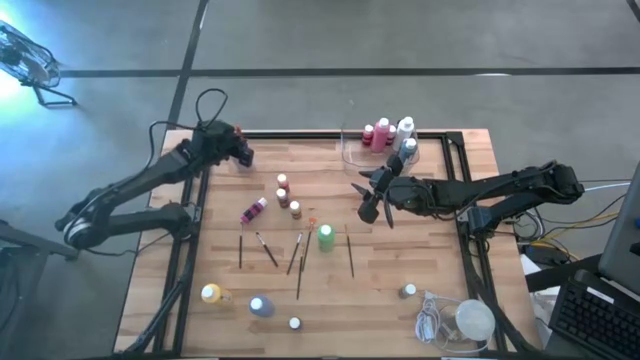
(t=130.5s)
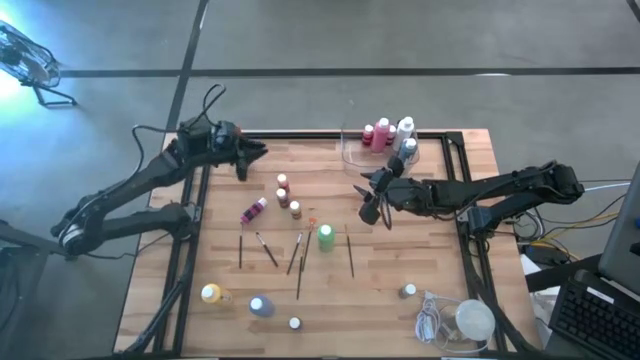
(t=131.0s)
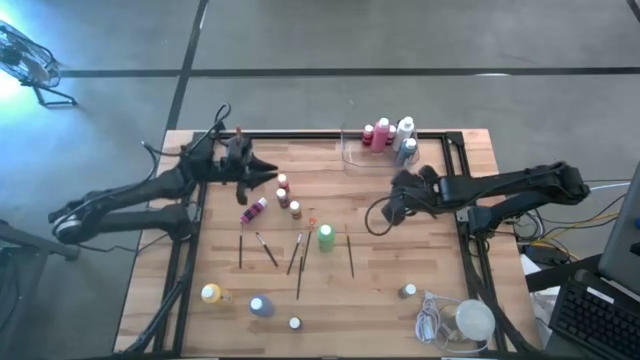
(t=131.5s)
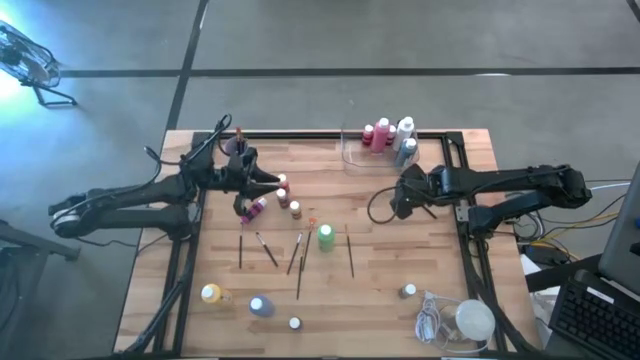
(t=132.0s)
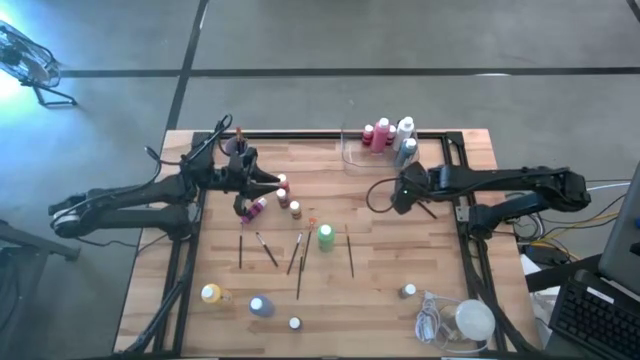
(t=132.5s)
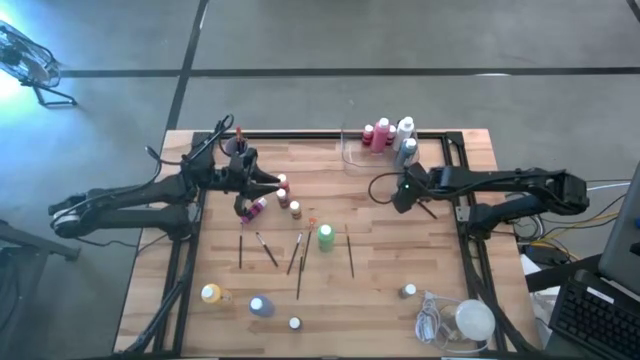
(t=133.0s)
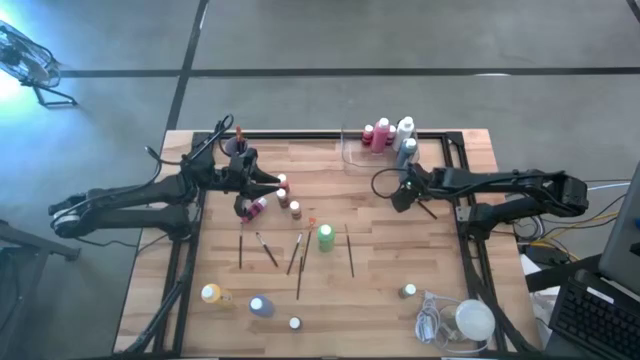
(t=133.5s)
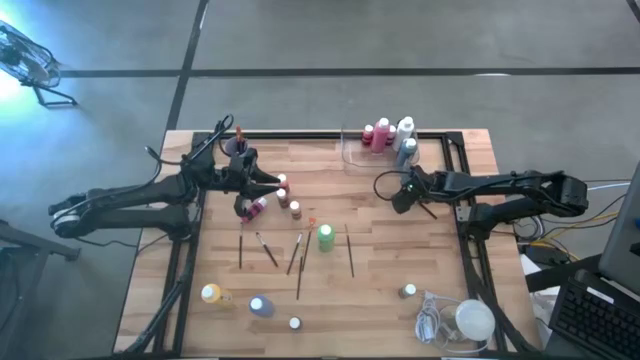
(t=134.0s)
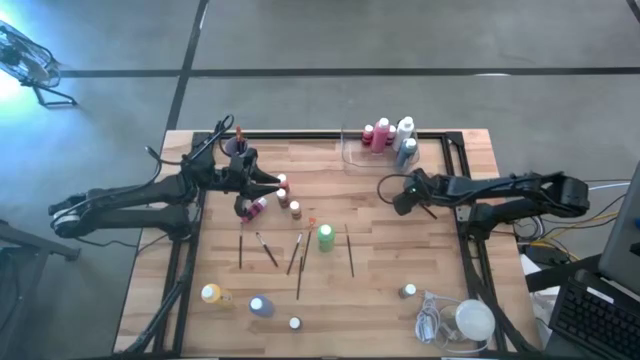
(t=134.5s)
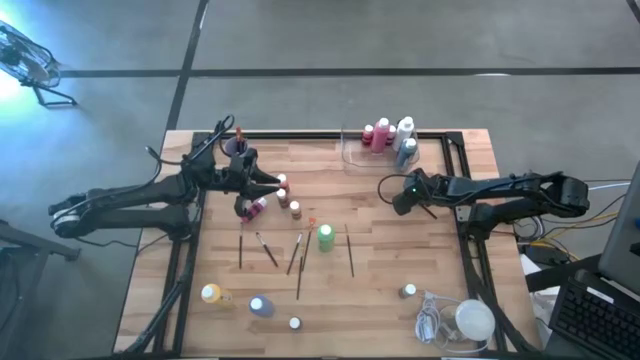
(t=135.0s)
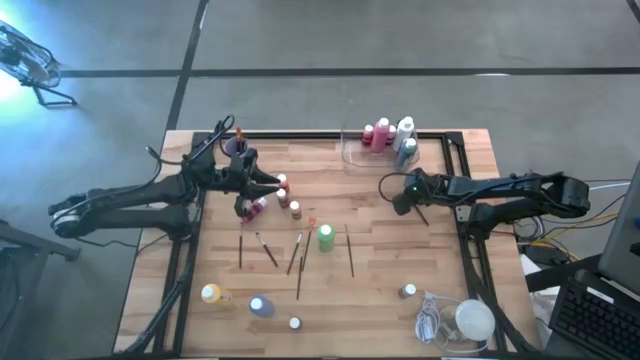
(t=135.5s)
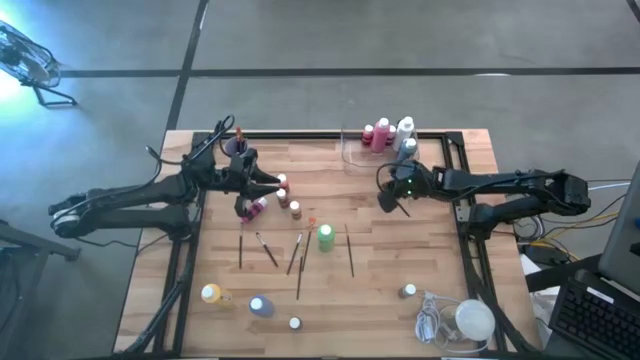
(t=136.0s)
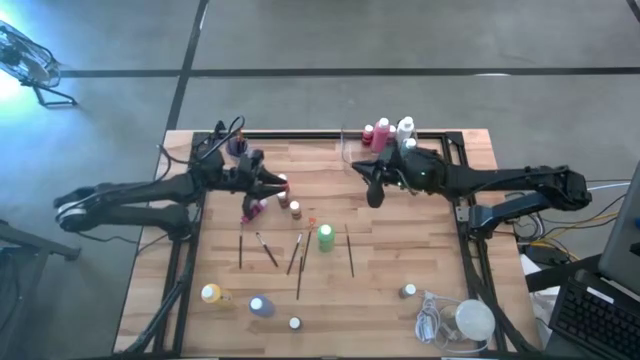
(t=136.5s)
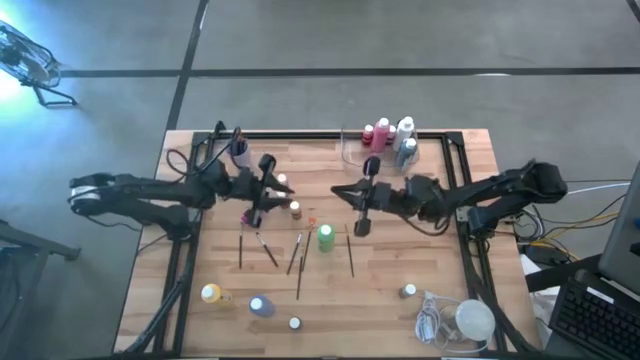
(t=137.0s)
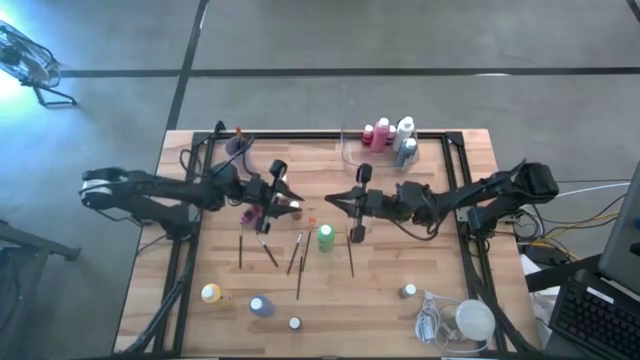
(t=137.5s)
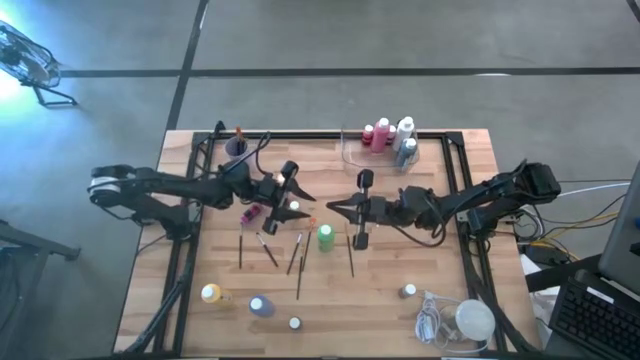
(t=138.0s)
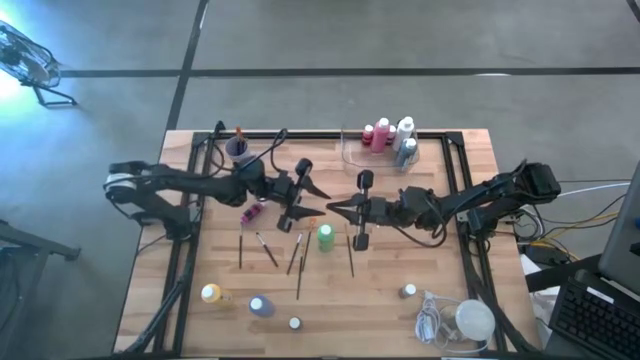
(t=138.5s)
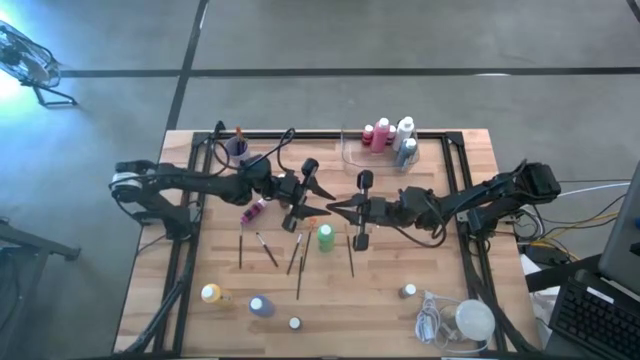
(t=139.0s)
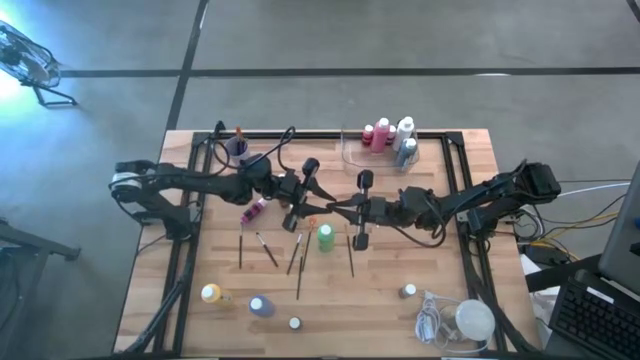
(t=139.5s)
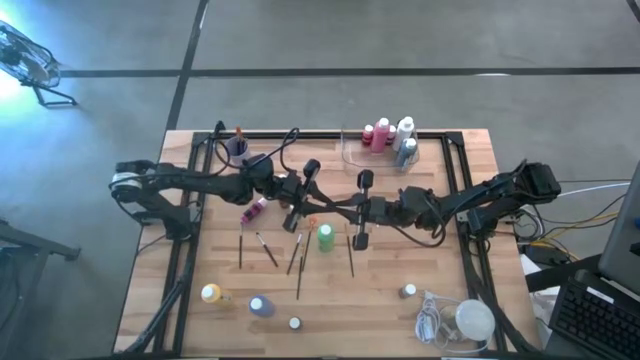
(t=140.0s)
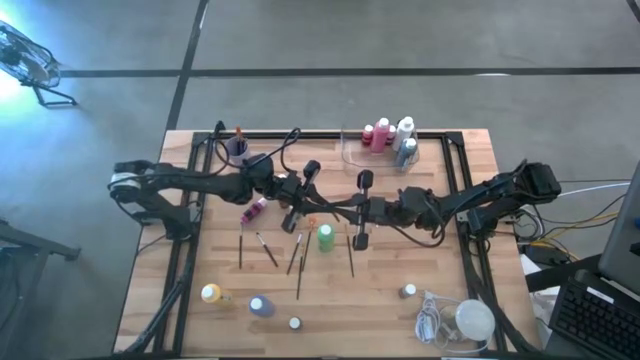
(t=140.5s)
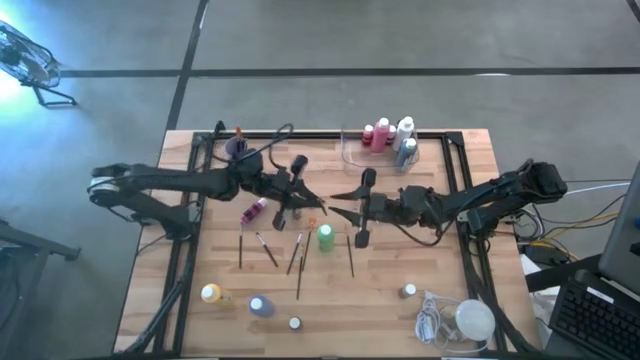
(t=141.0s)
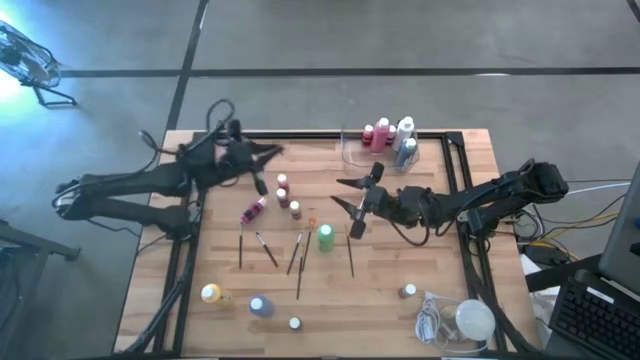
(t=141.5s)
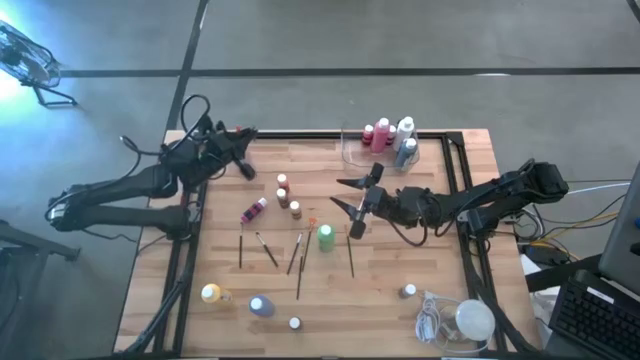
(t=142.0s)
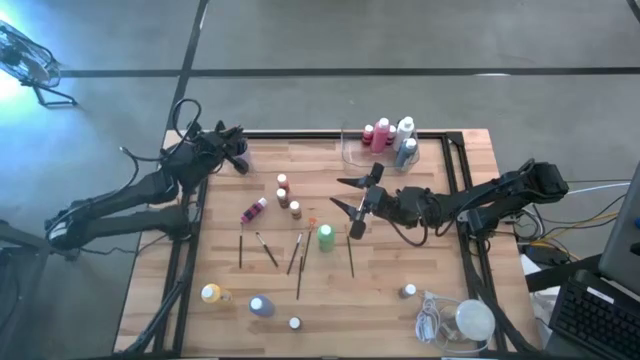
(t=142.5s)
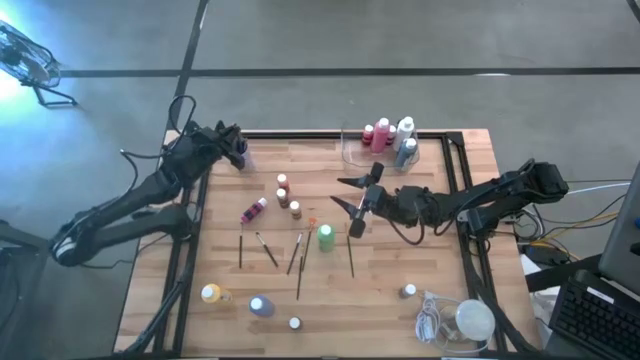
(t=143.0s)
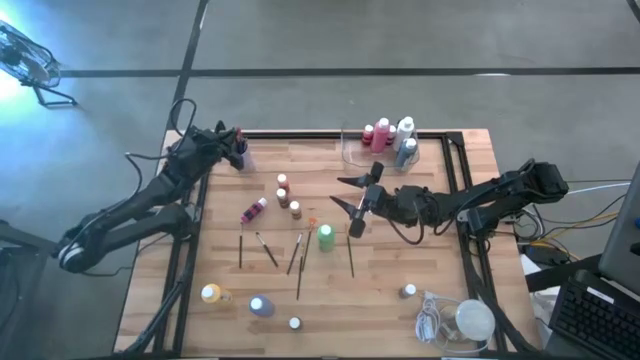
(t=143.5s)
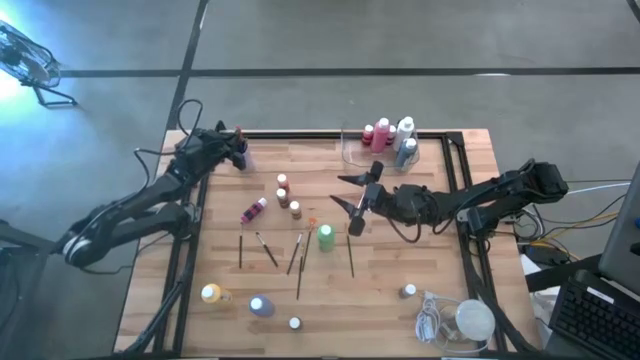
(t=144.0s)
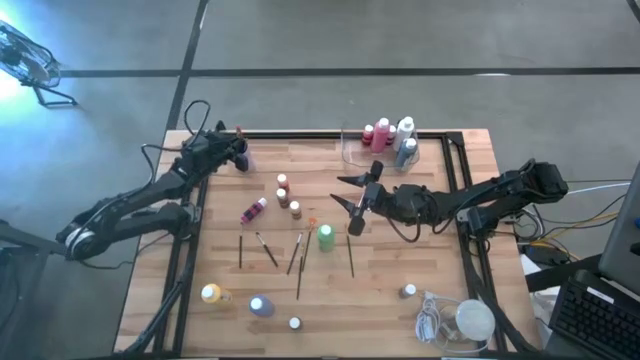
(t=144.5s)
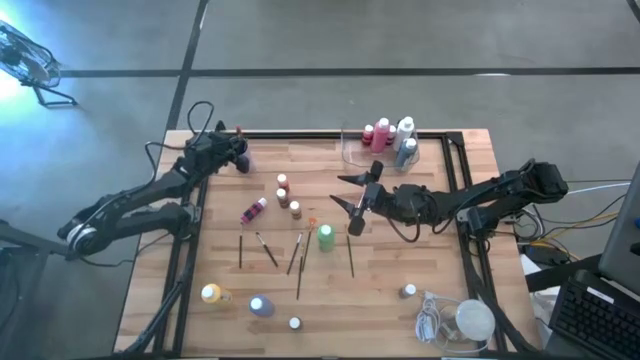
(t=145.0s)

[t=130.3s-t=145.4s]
Task: Pick & Place Paint Supplies
Put the silver paint brush into the violet cup

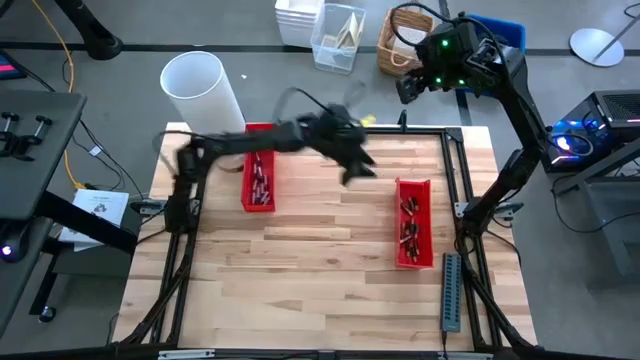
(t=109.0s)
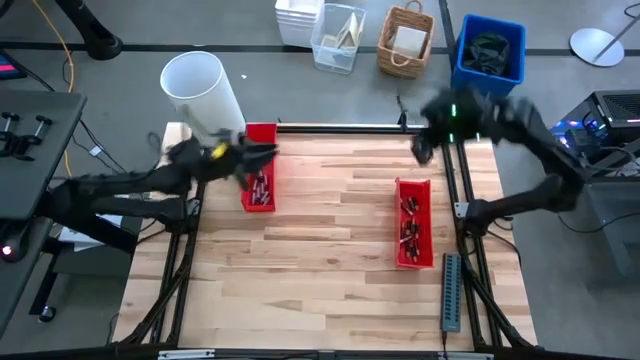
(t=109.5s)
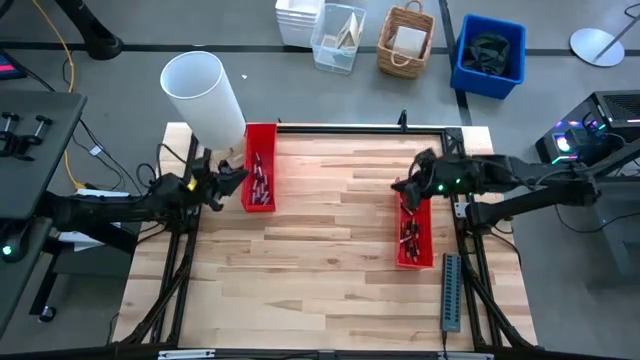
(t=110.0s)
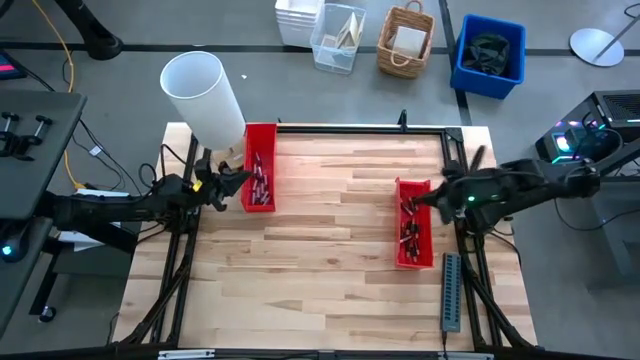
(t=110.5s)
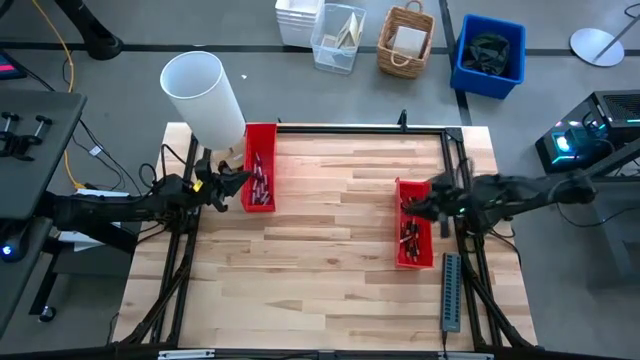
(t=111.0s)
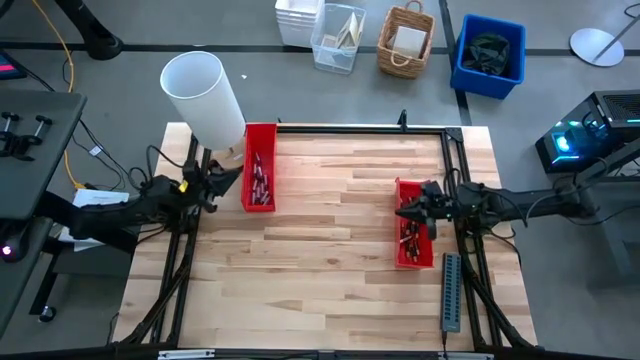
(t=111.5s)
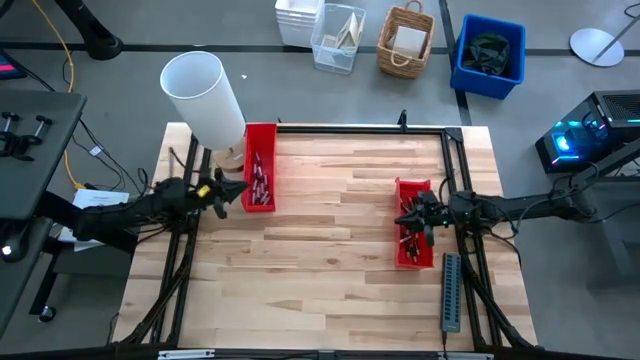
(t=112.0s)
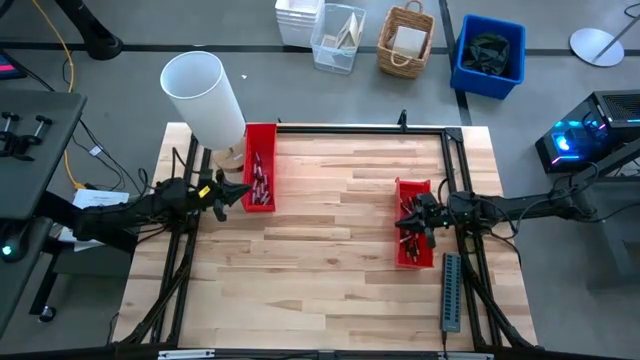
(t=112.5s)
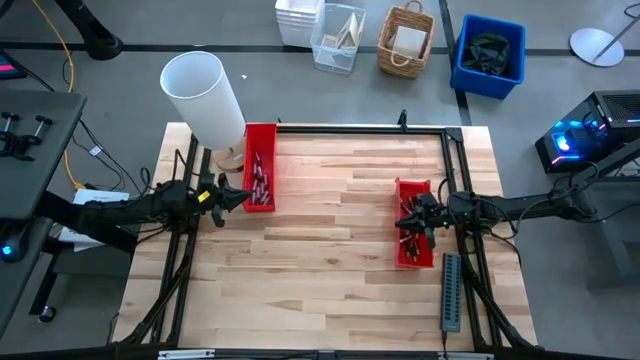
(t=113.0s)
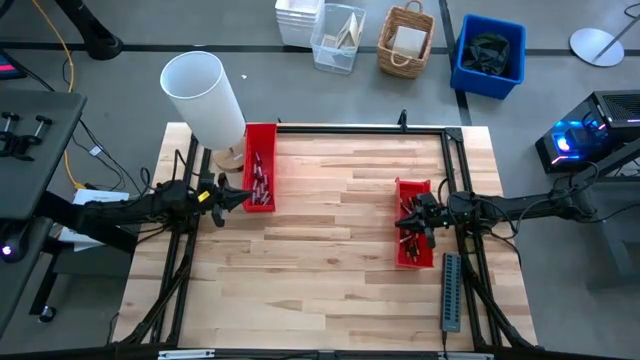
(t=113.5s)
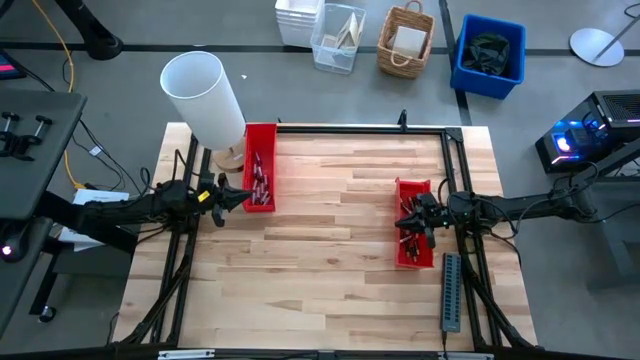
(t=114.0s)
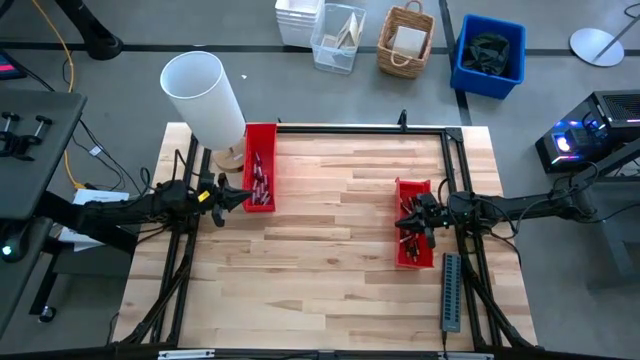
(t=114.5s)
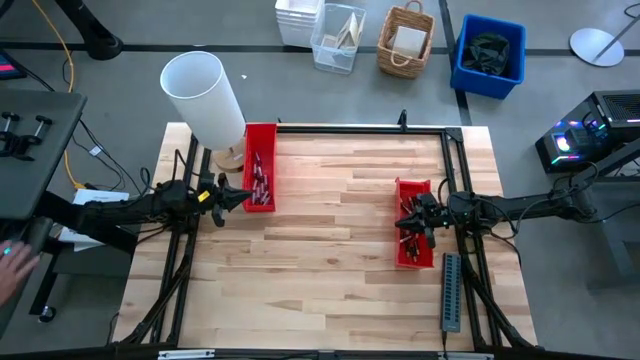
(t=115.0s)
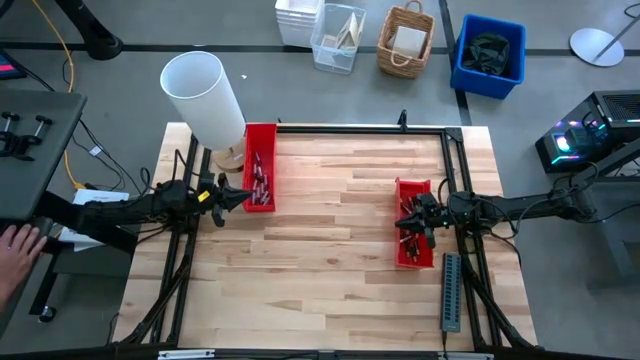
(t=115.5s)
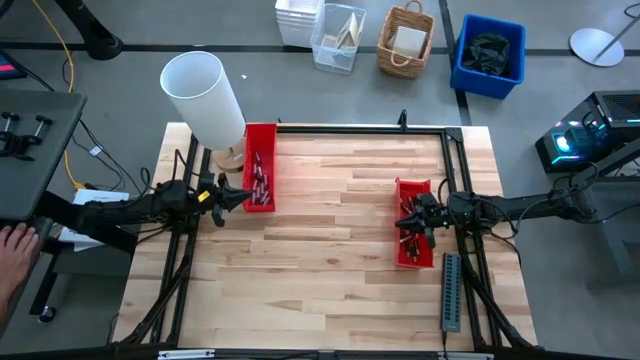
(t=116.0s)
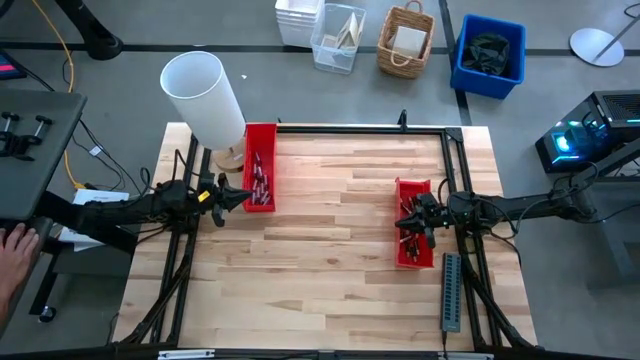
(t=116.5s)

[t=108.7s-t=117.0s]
Task: Sort batteries
Return to Home Position
